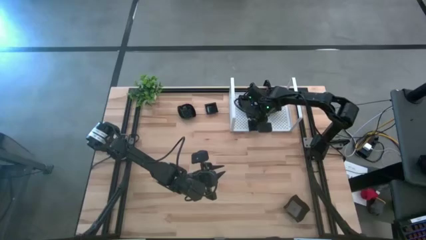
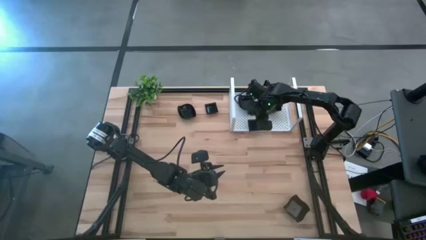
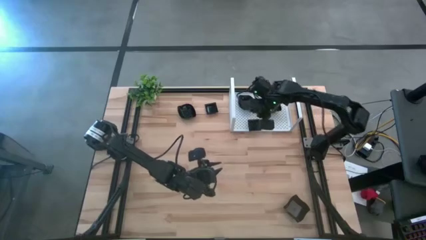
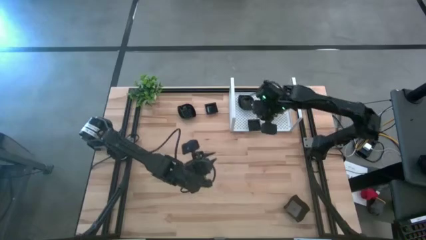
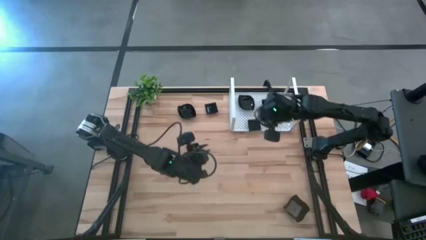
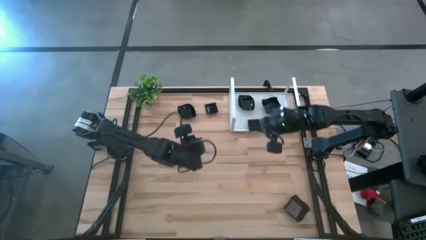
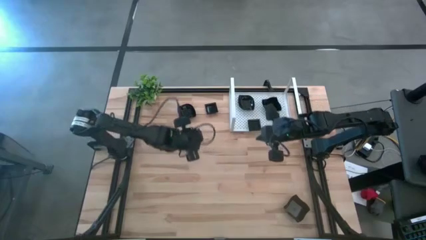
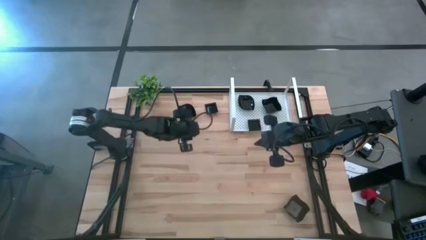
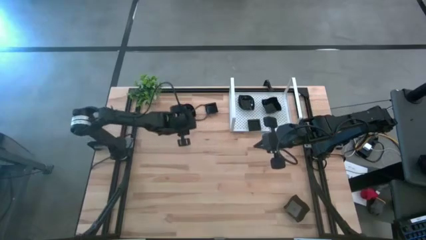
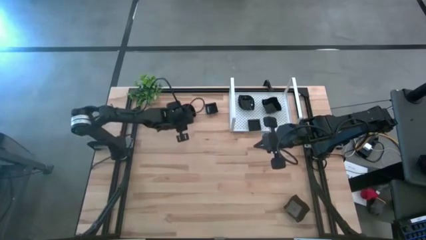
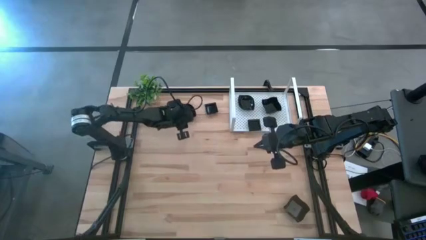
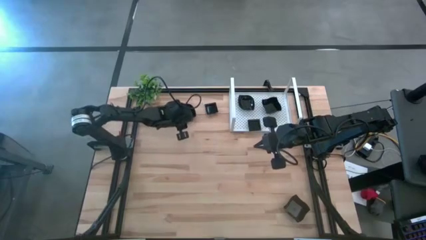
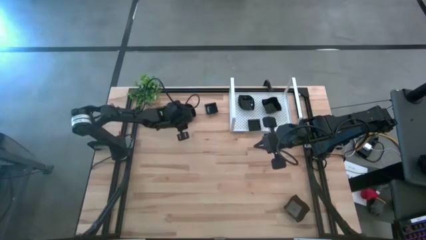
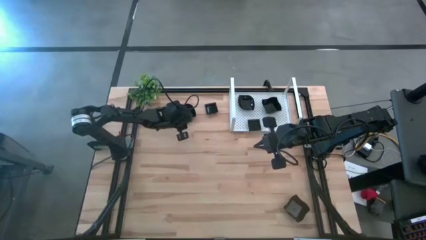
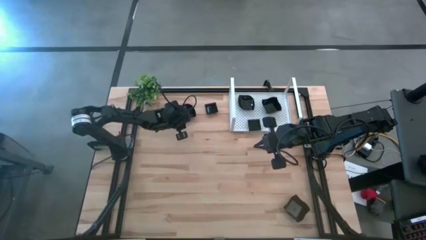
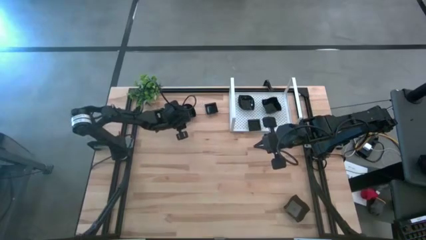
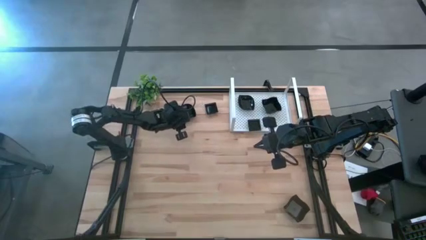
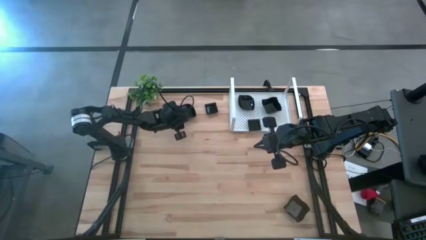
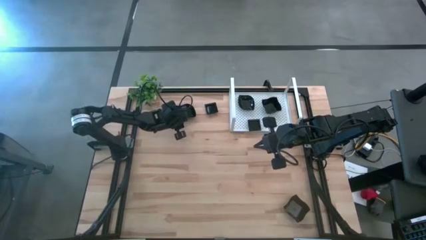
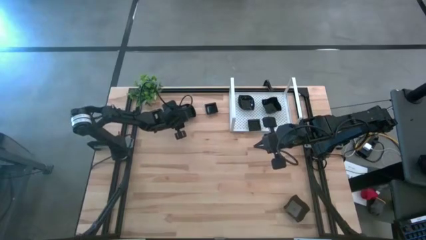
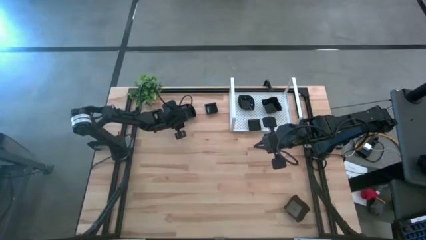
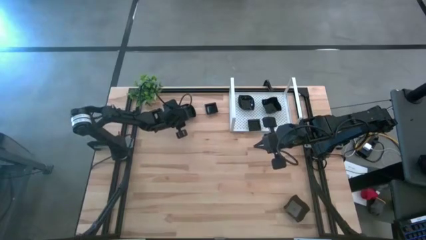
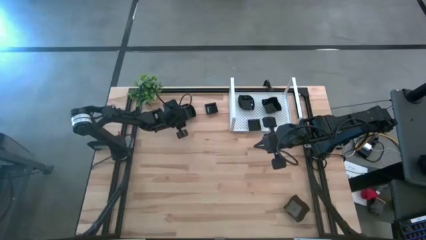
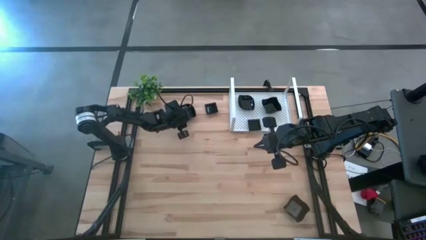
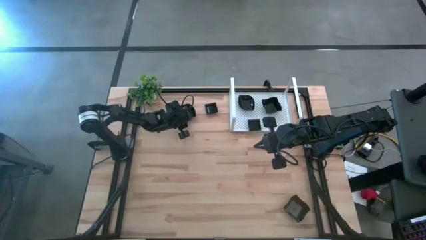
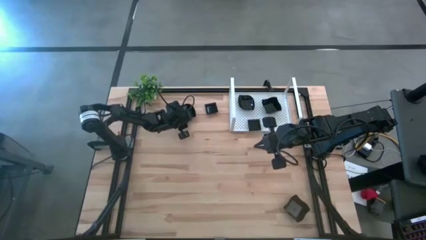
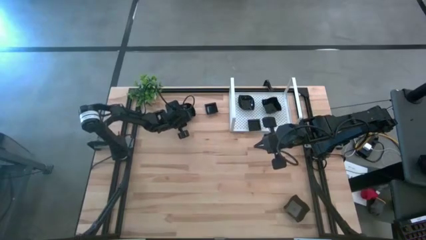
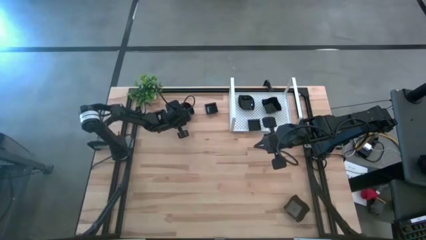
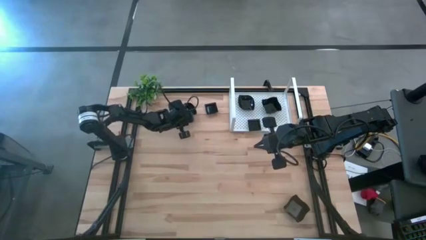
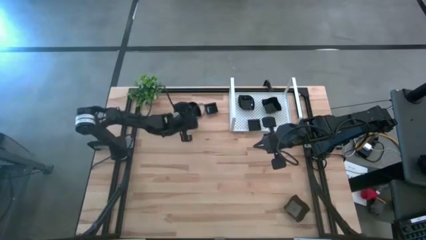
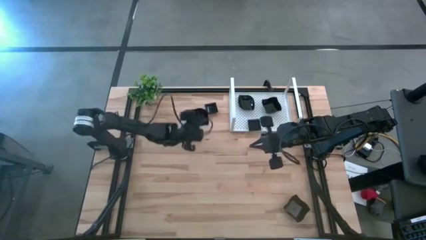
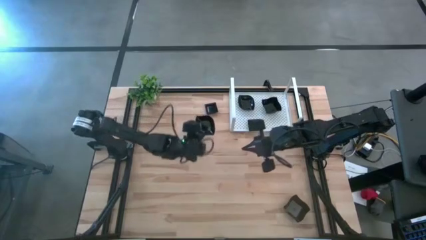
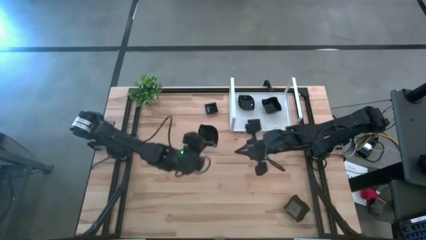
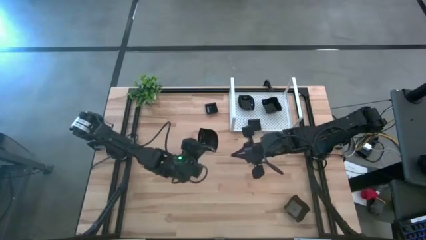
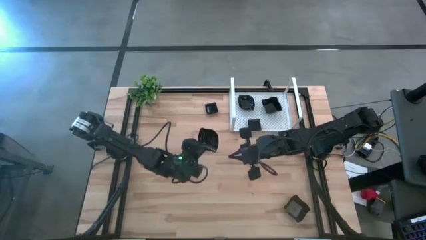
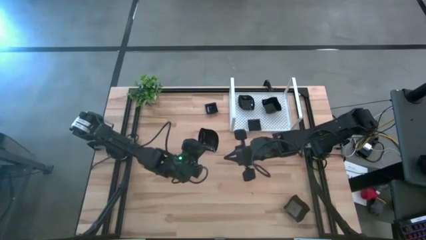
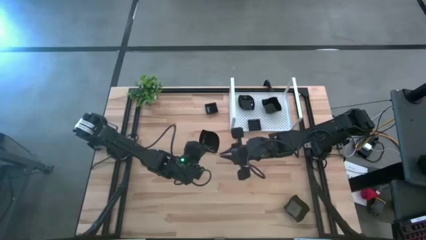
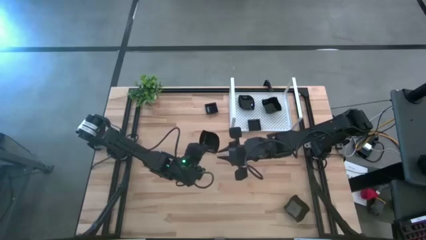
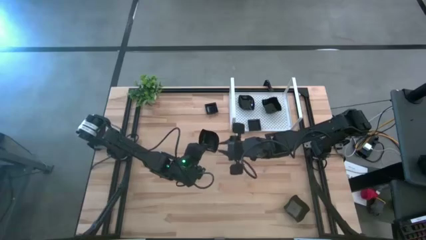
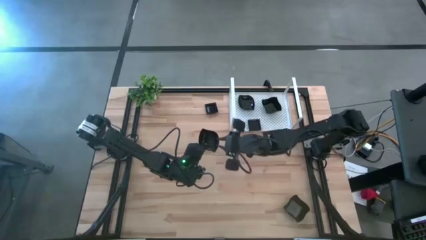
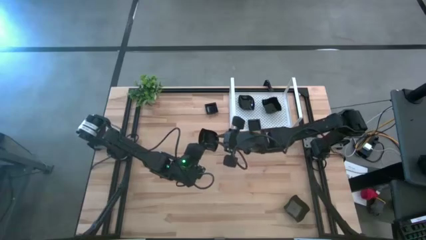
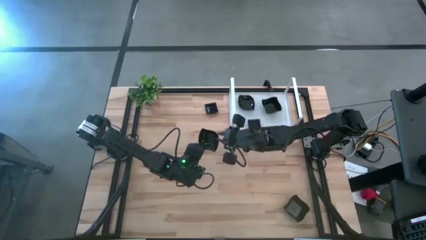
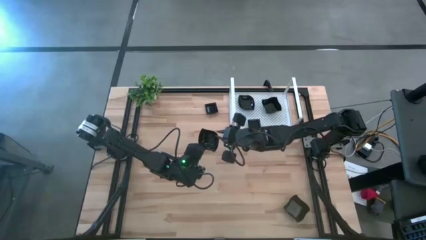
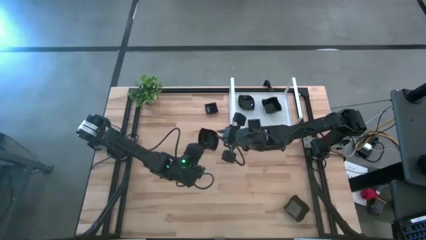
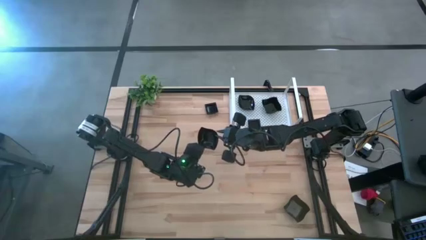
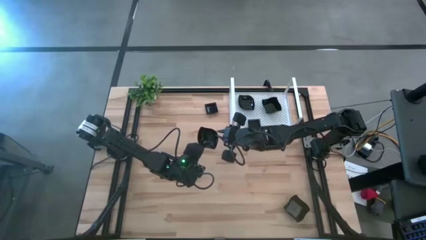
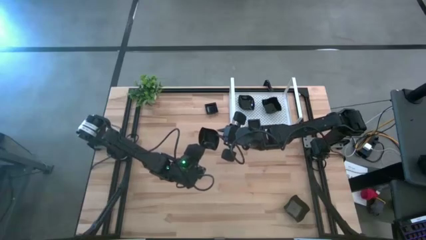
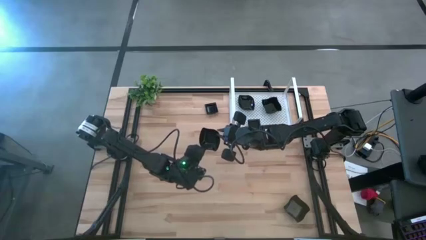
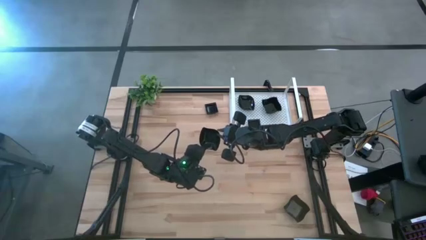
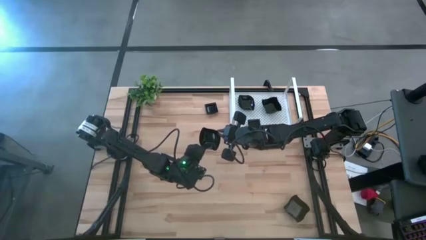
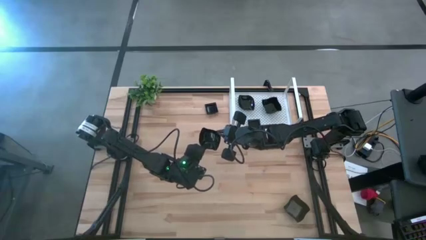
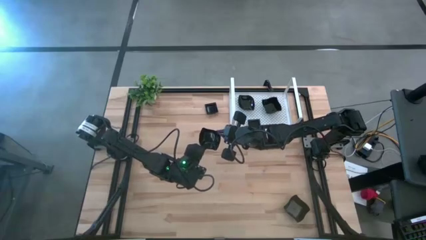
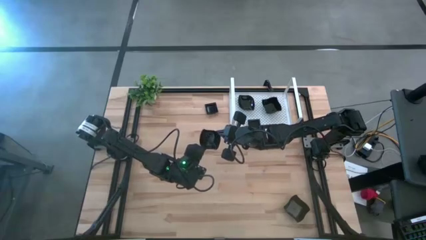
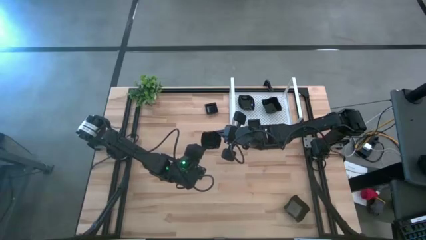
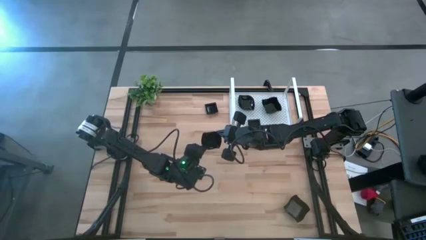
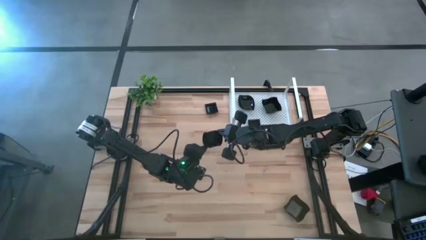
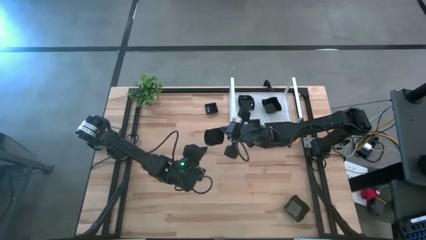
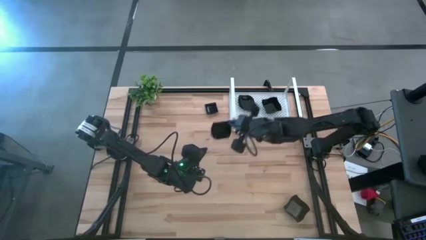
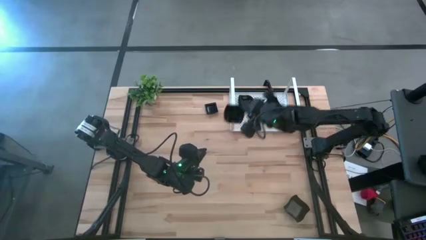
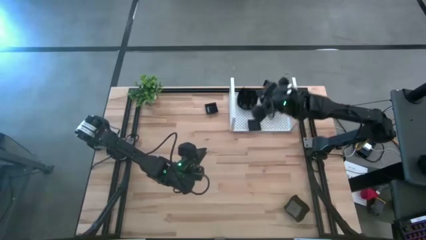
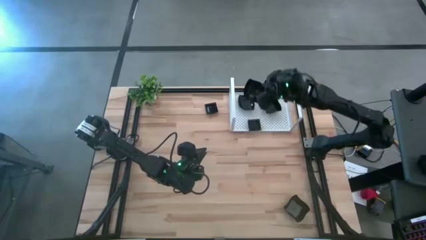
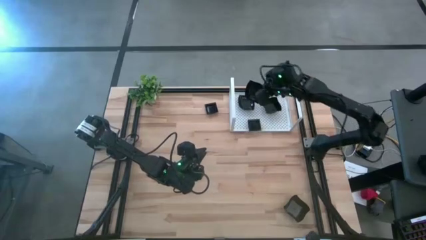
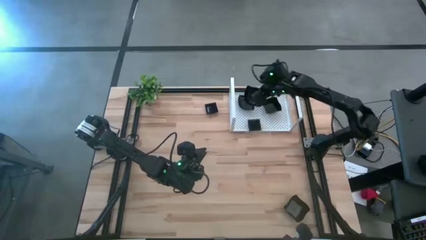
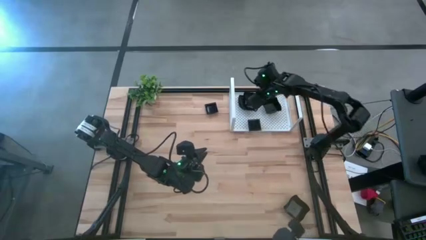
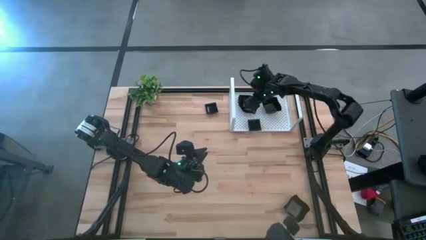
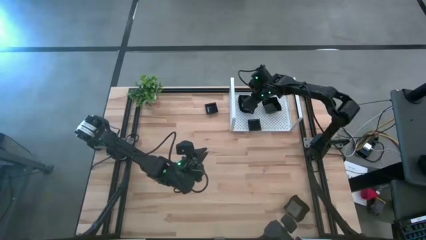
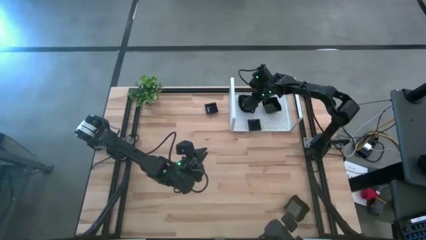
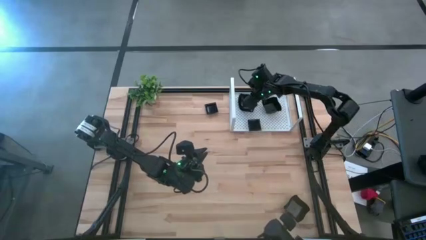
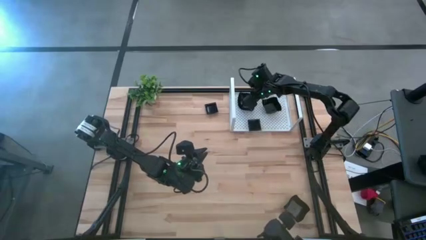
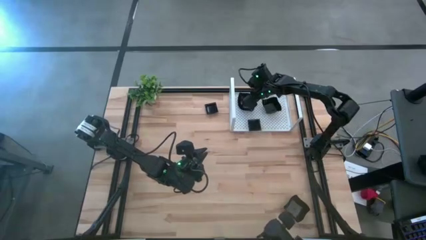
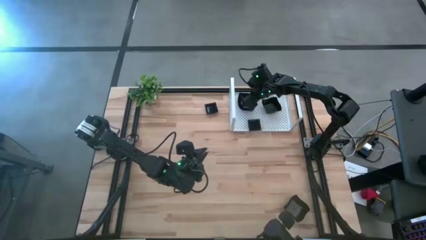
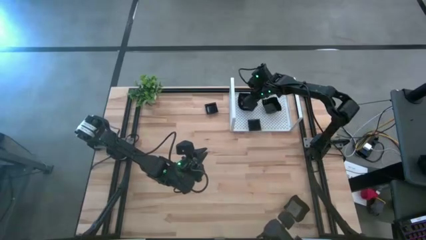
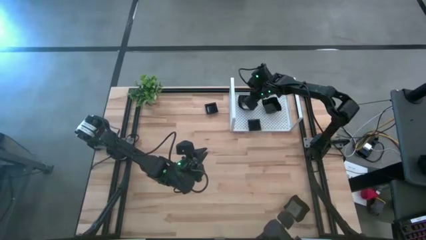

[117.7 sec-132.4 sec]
Task: Pick & Place Mini shaped plates
Stack the leaf shaped plate on top of the other leaf shaped plates on the shelf
